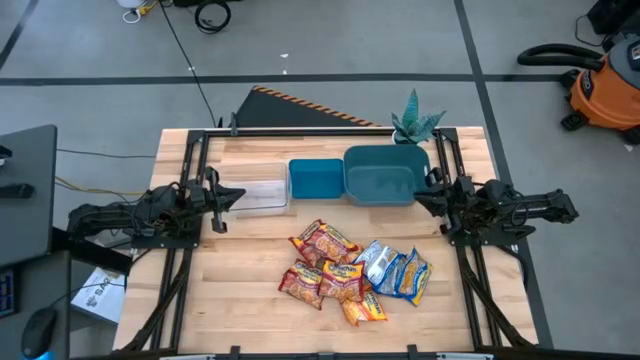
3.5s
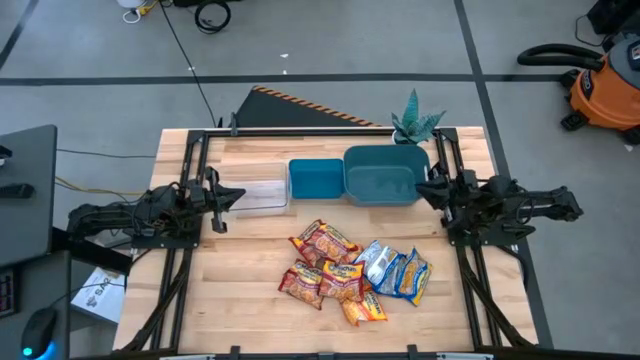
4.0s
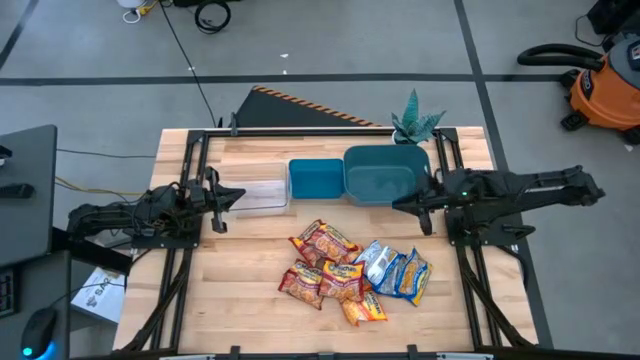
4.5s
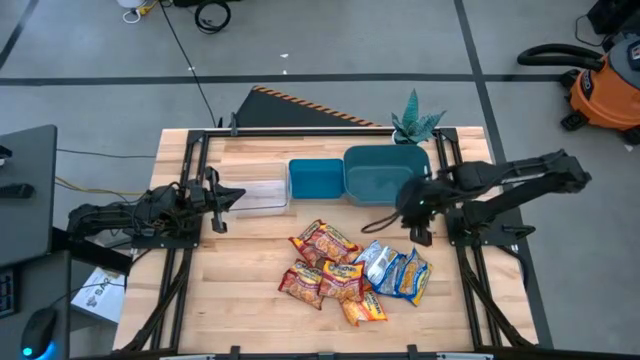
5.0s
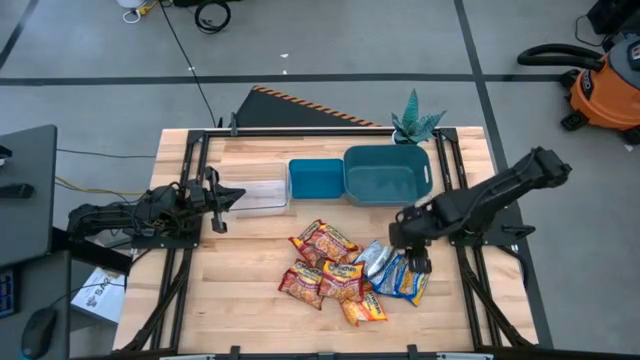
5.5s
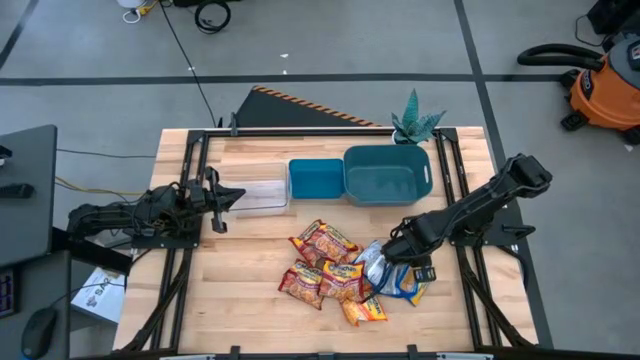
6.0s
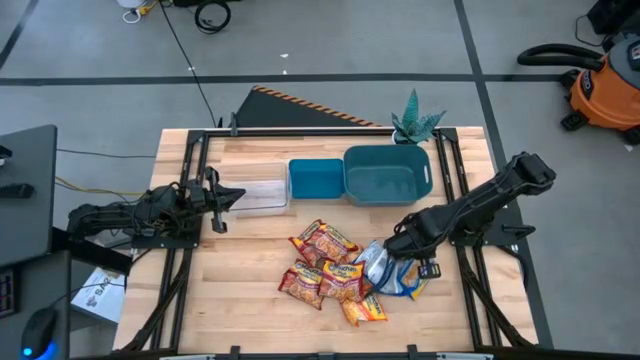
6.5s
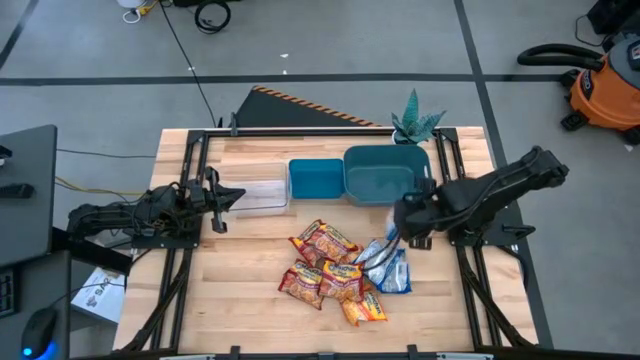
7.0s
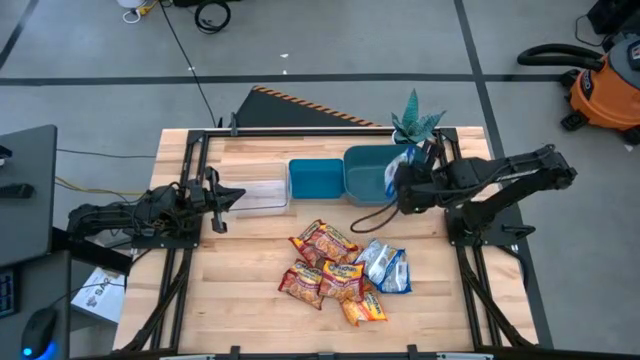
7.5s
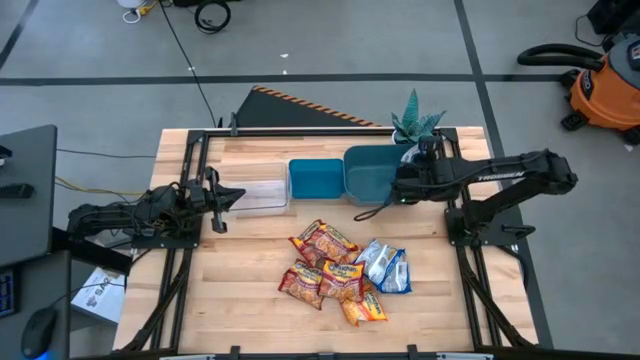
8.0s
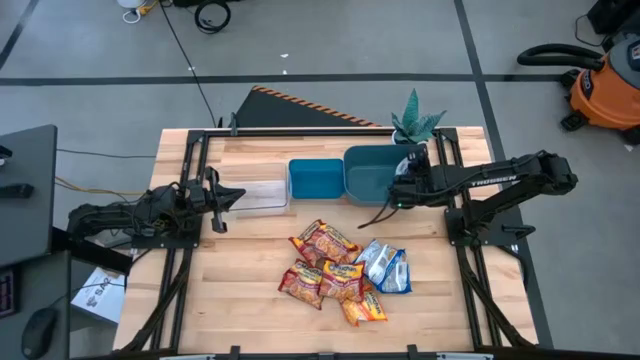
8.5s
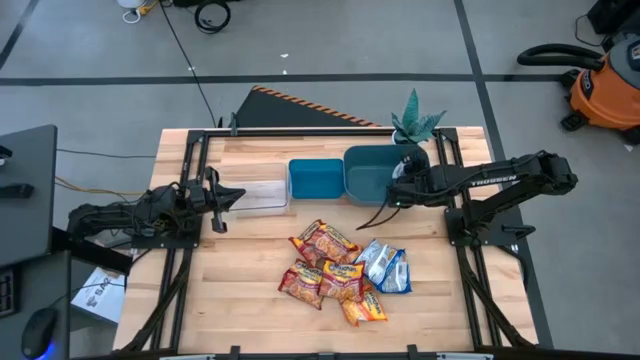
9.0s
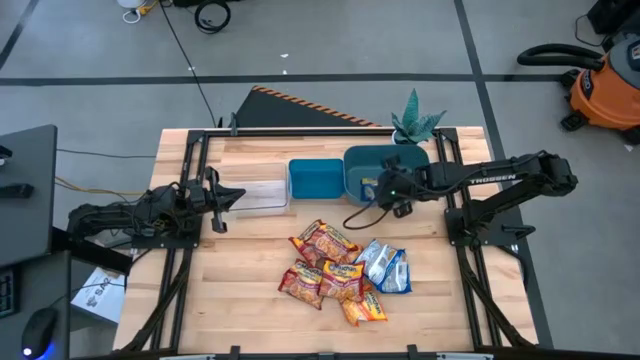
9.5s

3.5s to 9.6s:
Task: Sort Maruchan noodles
Put the blue bag into the right blue bin

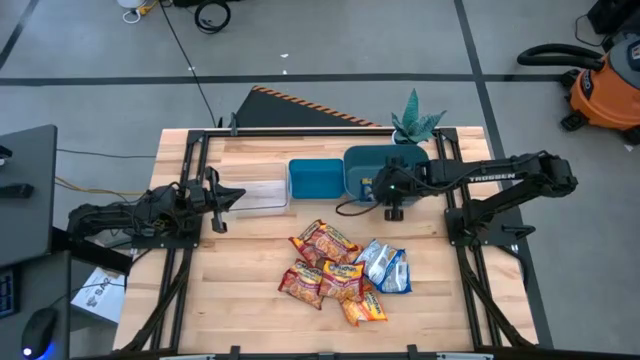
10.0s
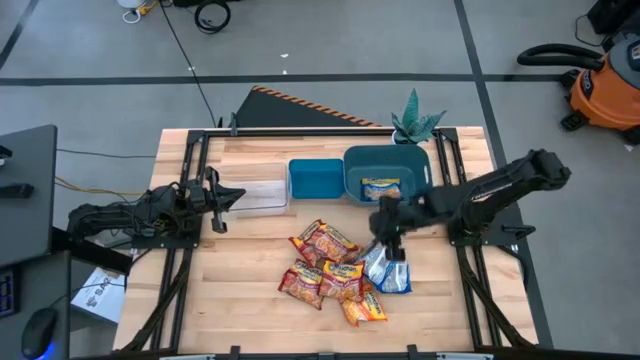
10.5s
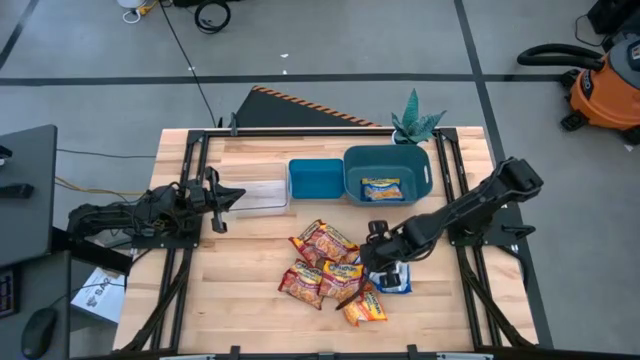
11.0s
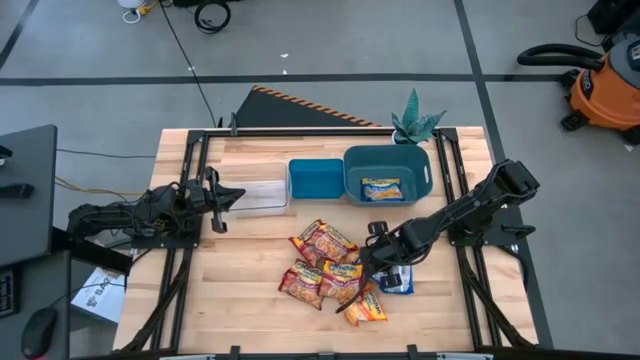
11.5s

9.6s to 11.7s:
Put the blue bag into the right blue bin

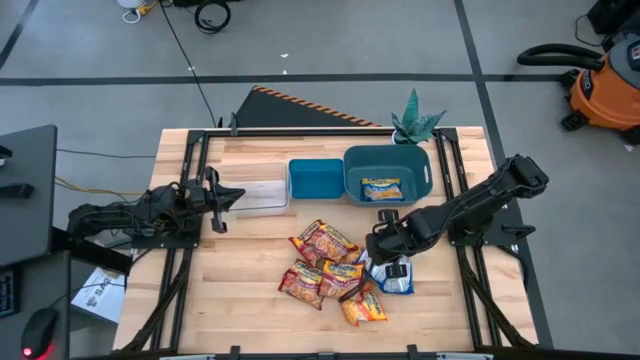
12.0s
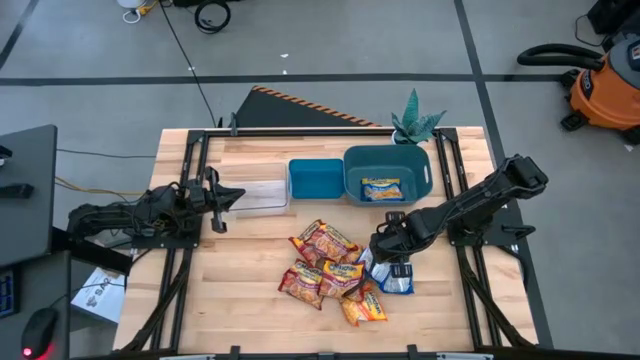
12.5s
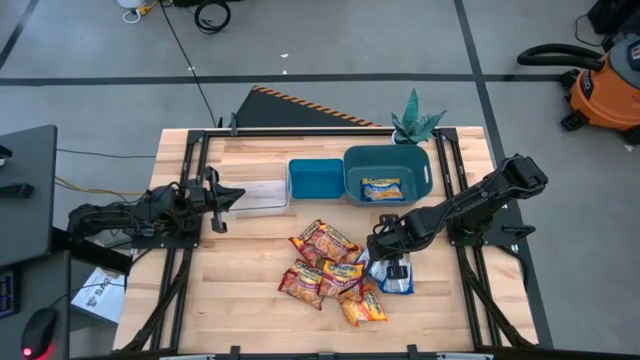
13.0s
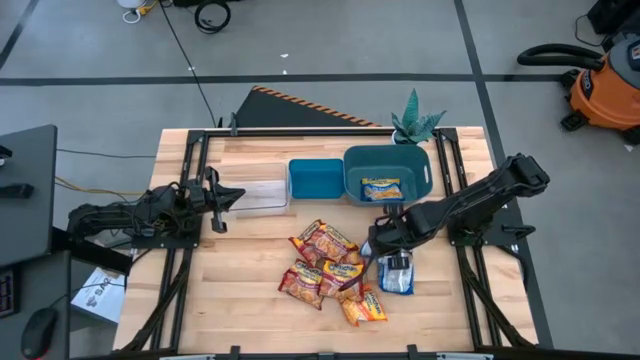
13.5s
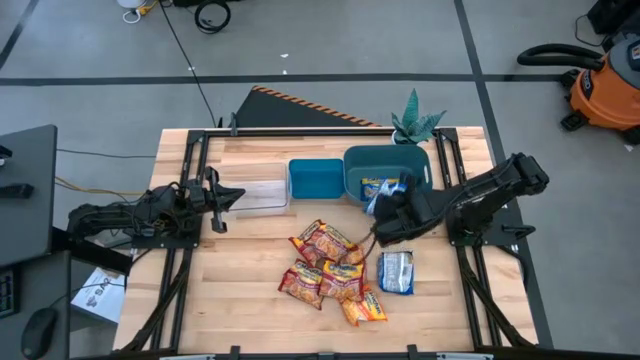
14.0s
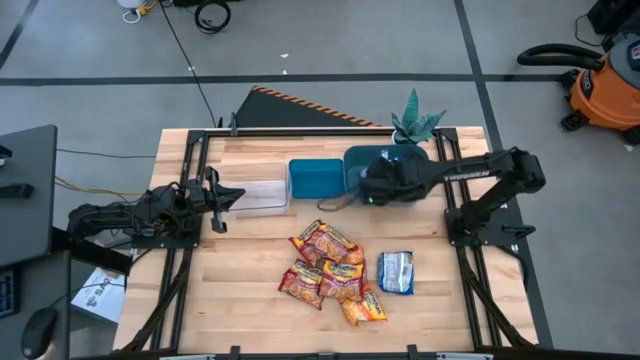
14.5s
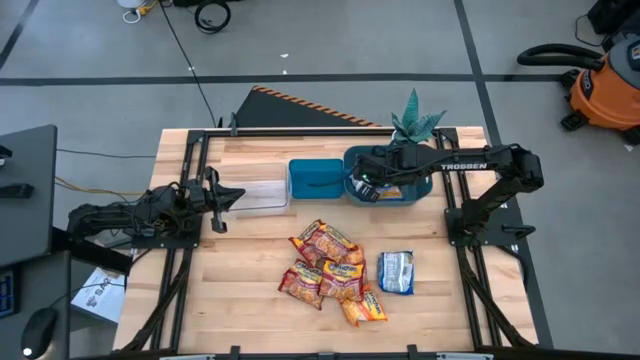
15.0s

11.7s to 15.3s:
Put the blue bag into the right blue bin

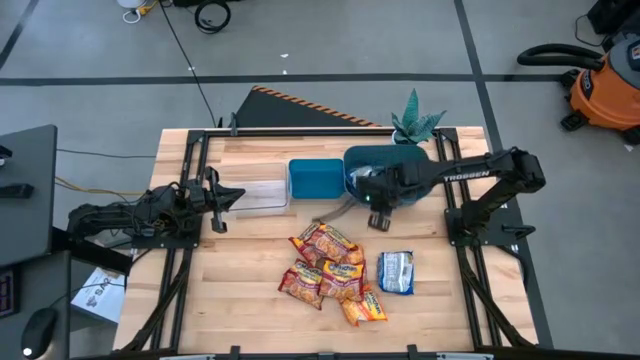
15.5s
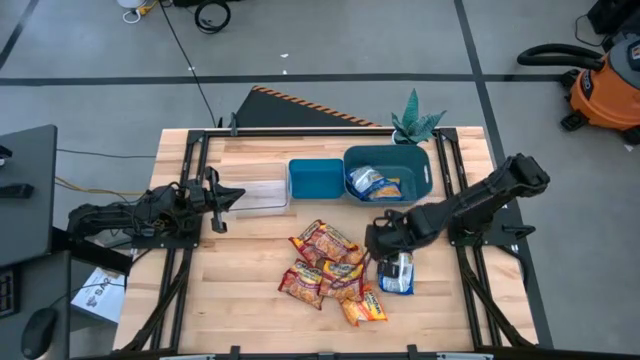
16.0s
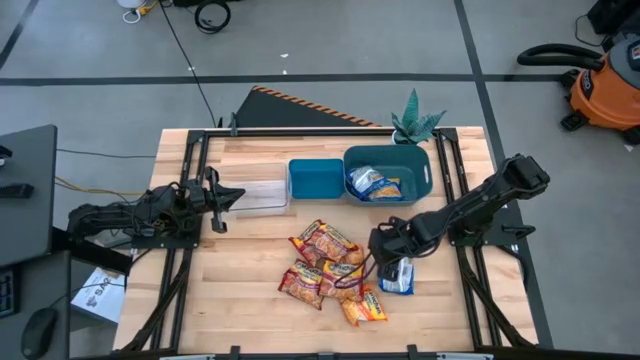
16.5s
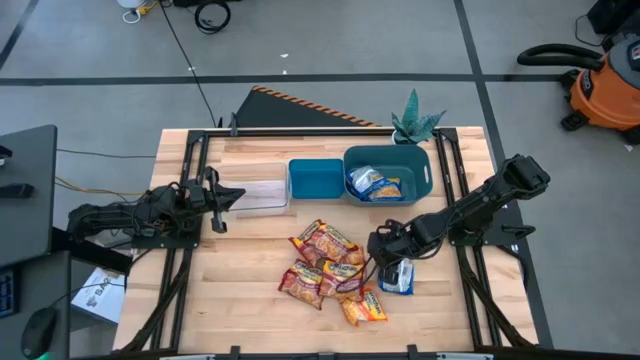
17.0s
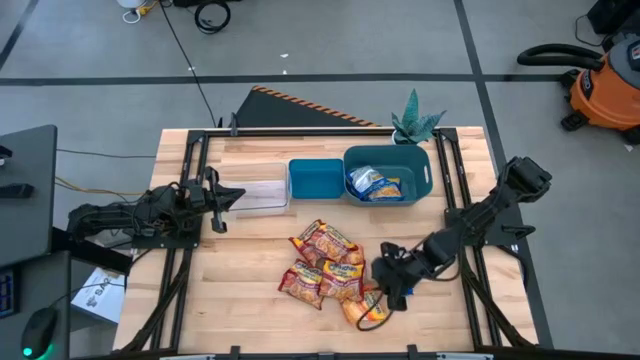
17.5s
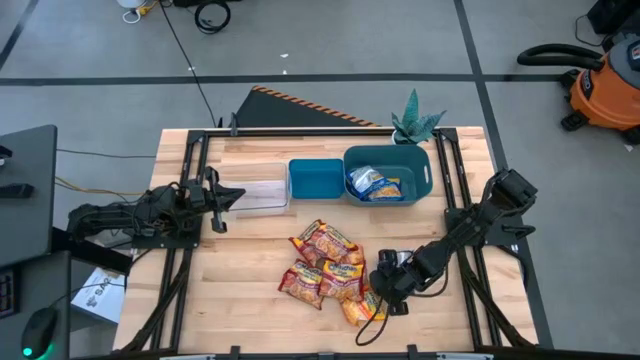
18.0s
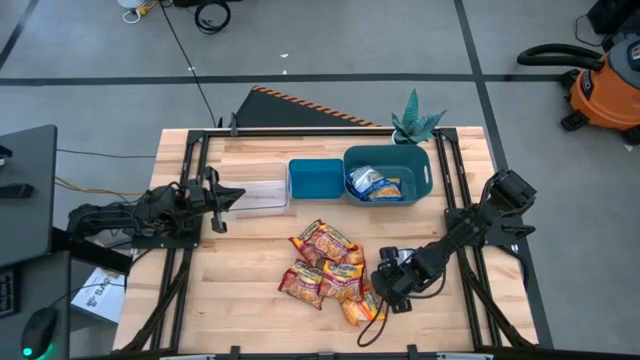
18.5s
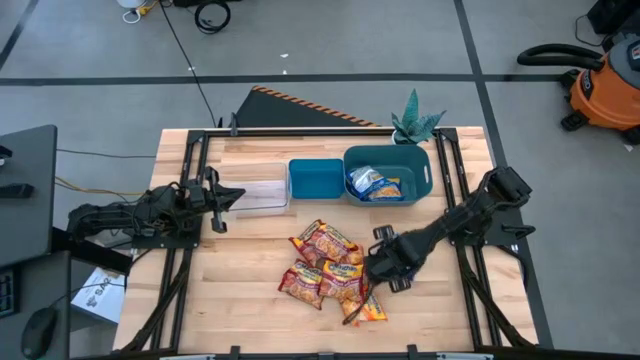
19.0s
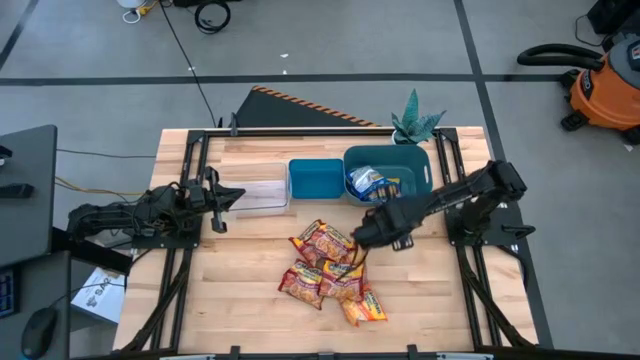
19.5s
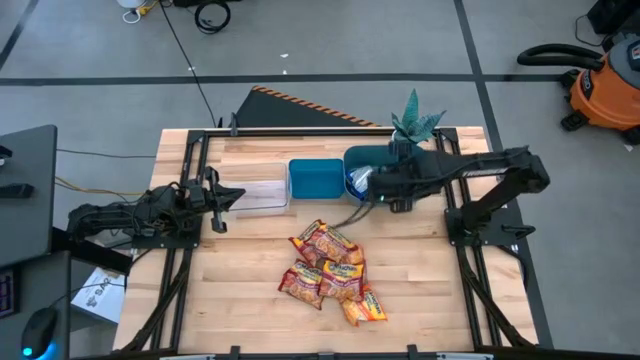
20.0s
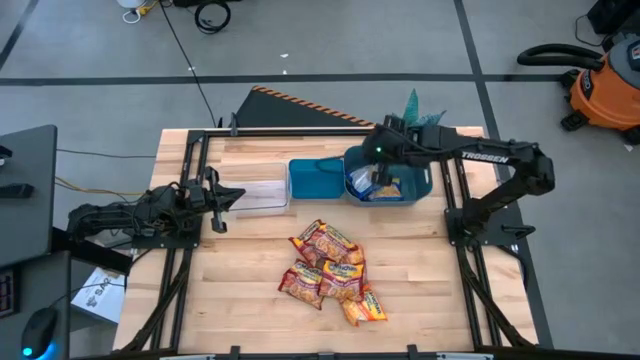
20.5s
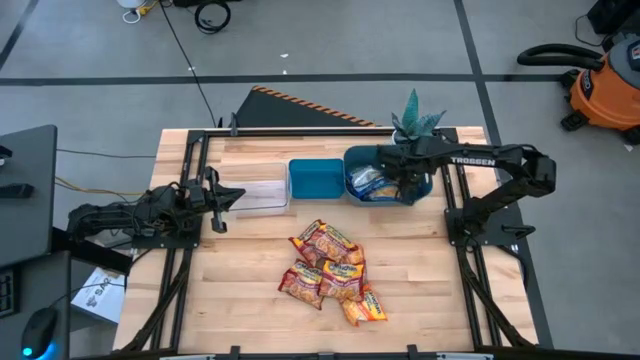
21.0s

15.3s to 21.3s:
Put the blue bag into the right blue bin

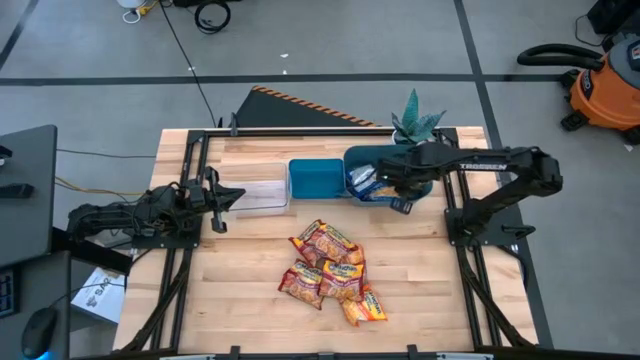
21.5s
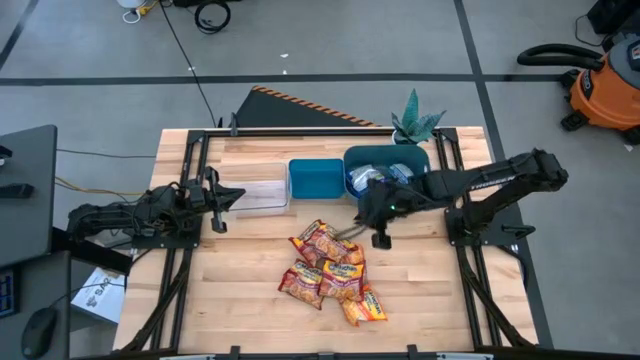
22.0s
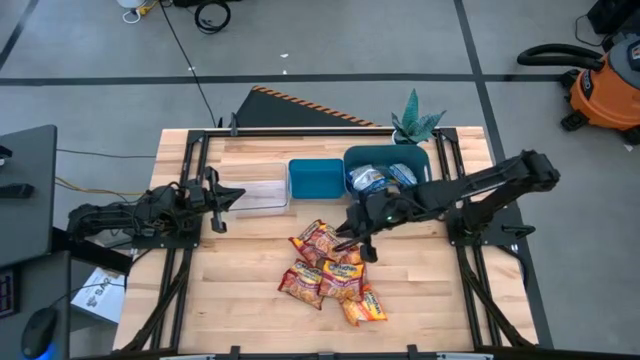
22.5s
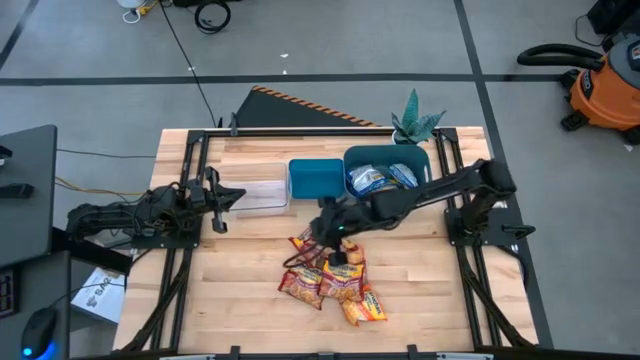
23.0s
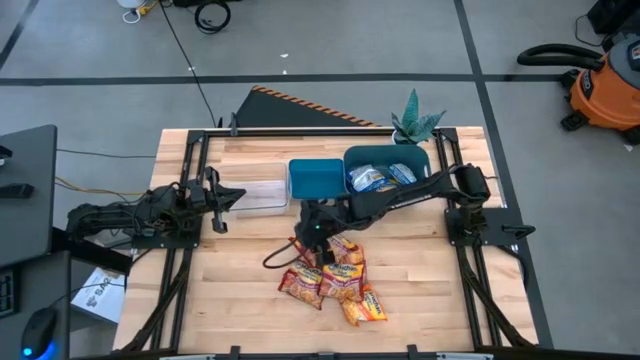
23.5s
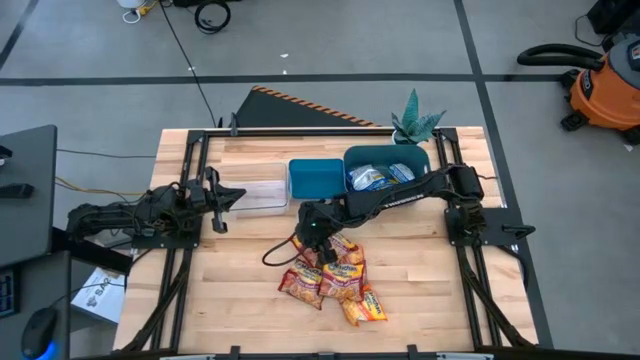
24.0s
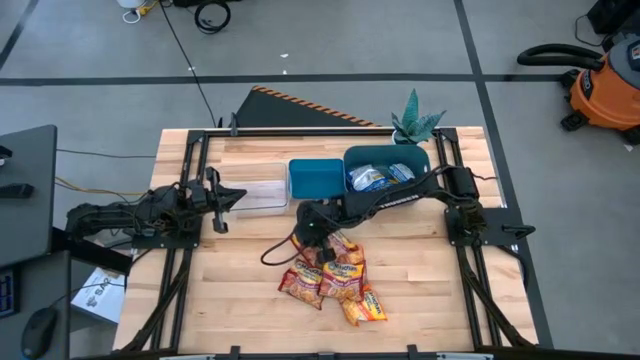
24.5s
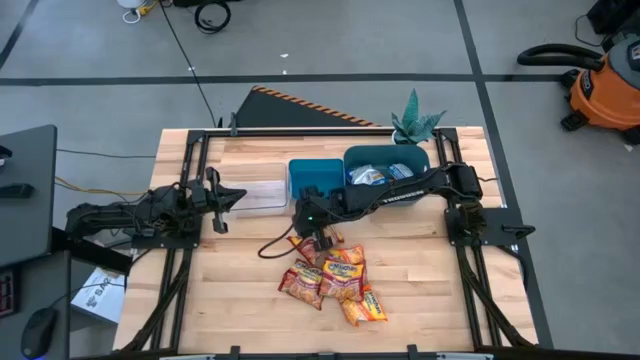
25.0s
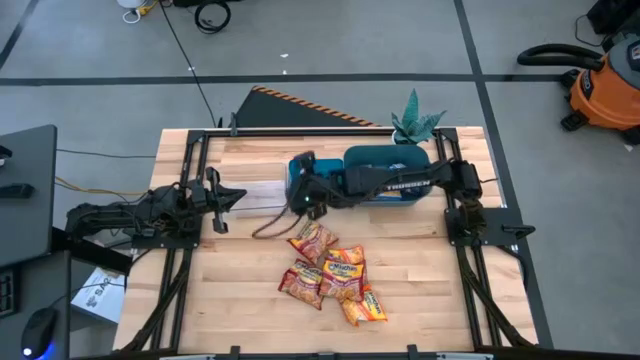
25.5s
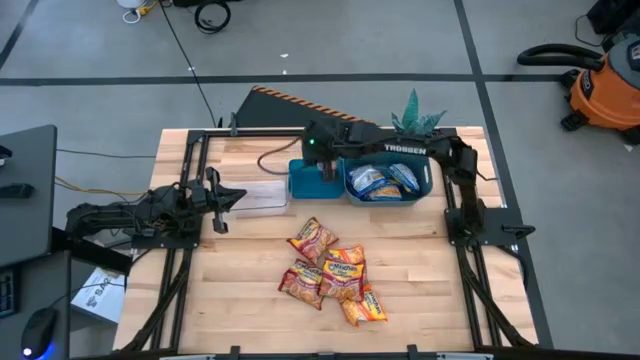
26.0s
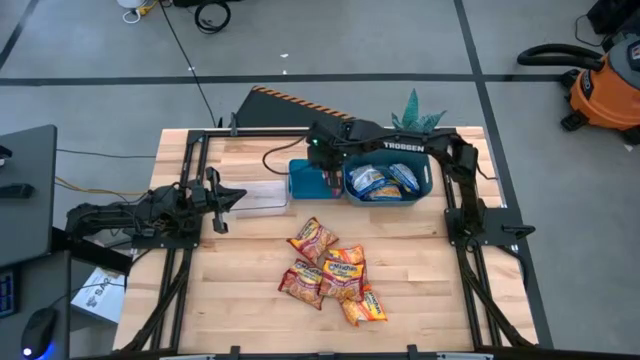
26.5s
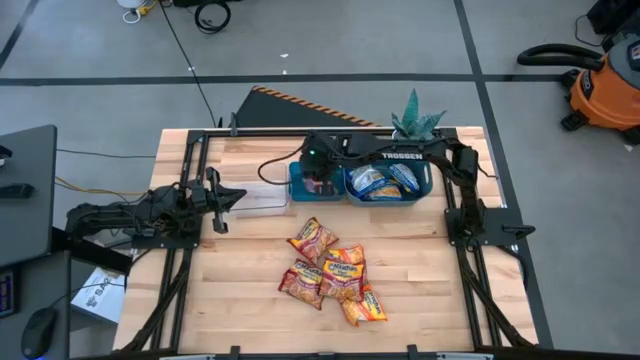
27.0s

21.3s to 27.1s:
Put the red bag into the left blue bin
